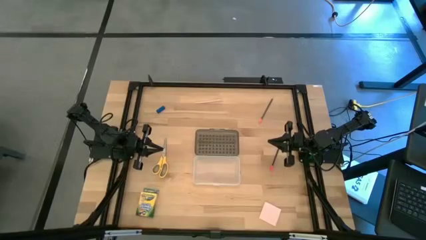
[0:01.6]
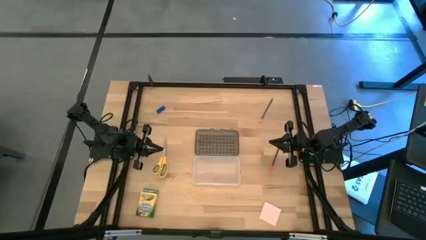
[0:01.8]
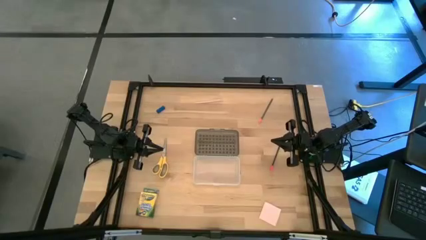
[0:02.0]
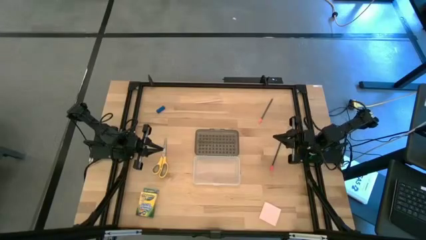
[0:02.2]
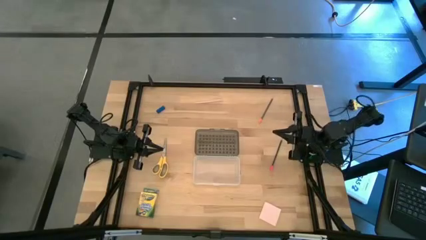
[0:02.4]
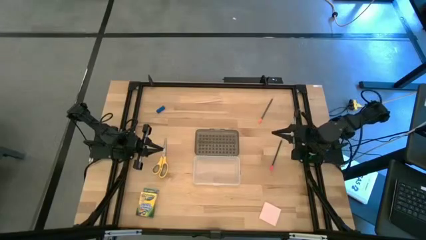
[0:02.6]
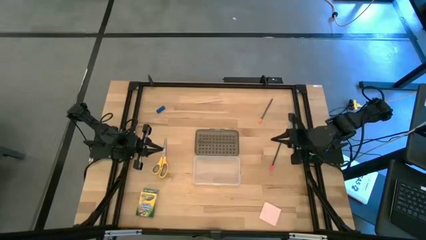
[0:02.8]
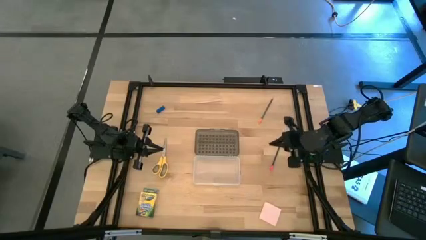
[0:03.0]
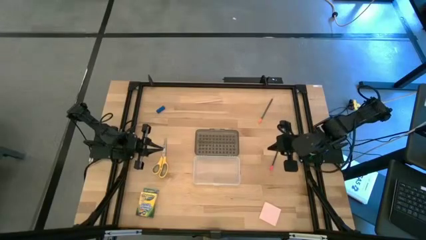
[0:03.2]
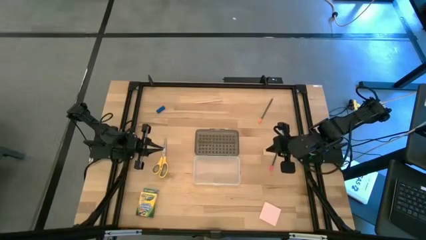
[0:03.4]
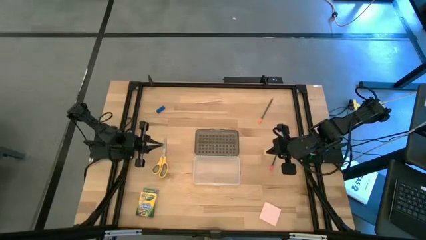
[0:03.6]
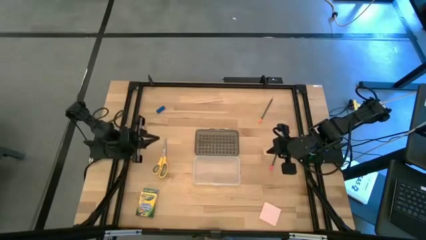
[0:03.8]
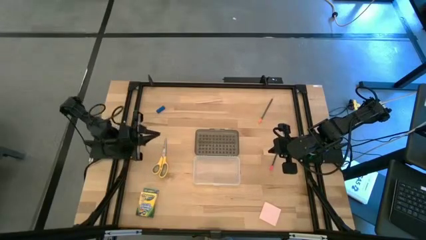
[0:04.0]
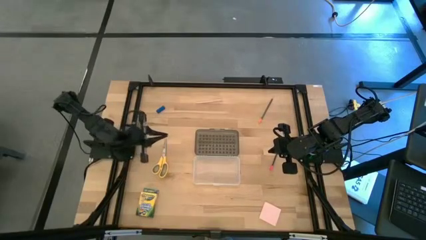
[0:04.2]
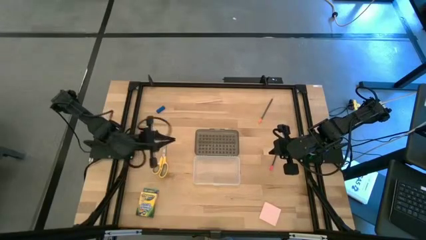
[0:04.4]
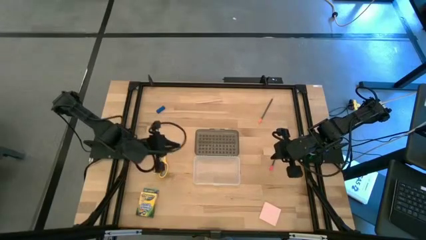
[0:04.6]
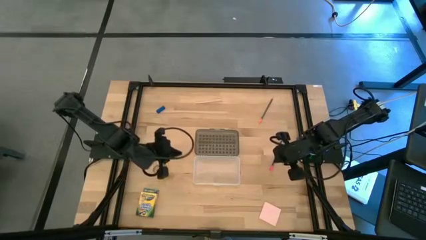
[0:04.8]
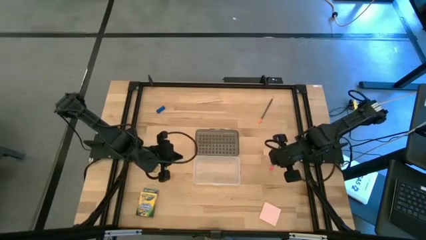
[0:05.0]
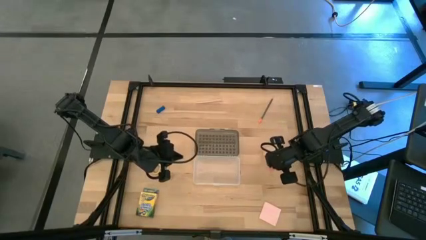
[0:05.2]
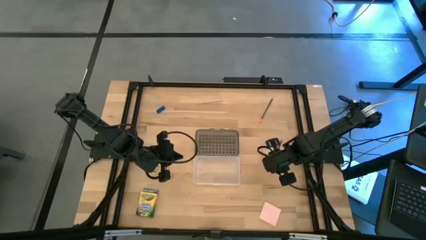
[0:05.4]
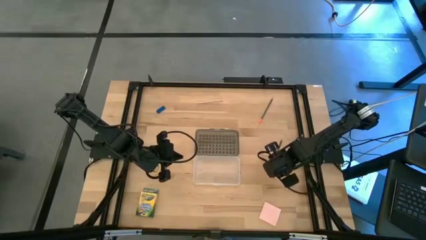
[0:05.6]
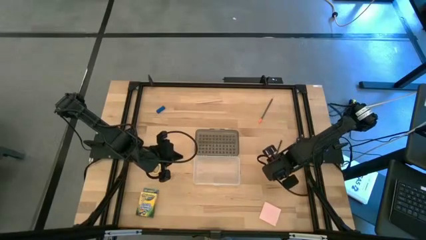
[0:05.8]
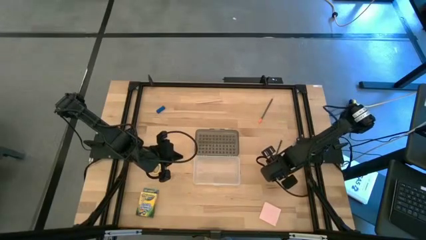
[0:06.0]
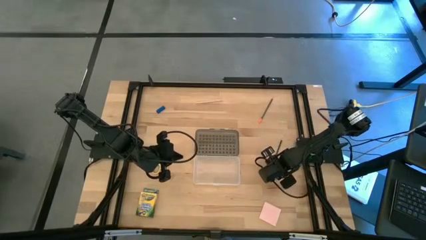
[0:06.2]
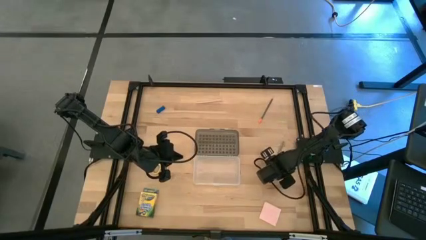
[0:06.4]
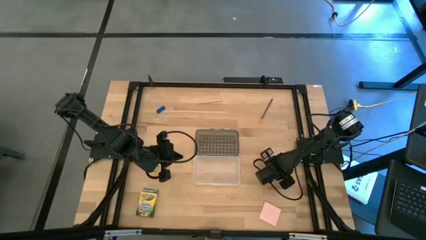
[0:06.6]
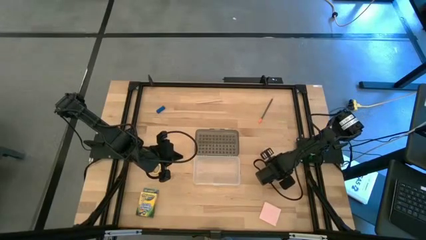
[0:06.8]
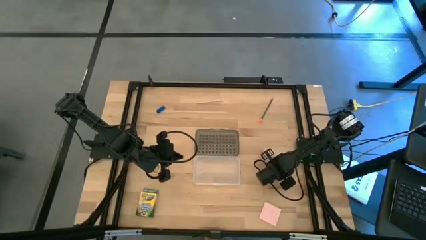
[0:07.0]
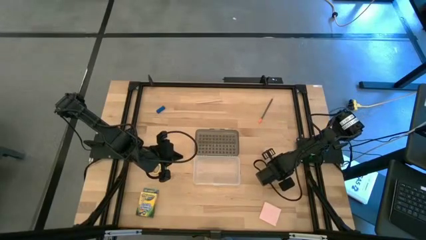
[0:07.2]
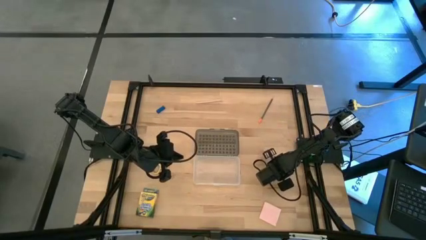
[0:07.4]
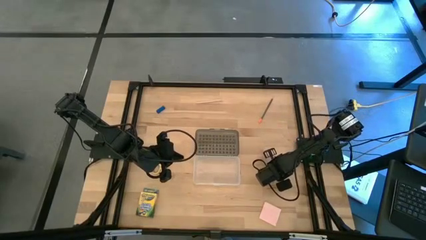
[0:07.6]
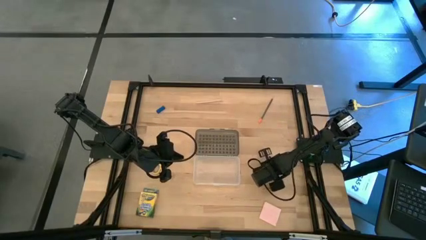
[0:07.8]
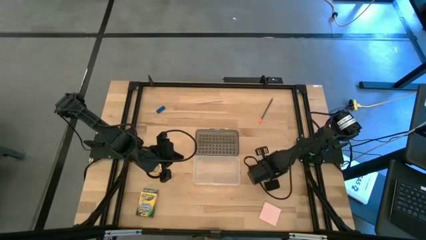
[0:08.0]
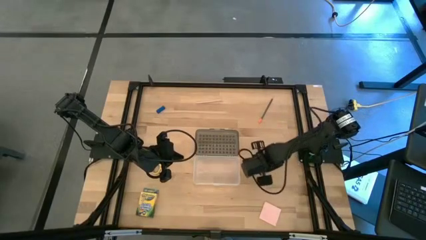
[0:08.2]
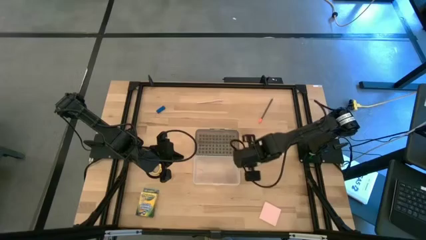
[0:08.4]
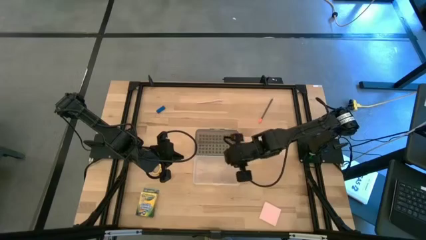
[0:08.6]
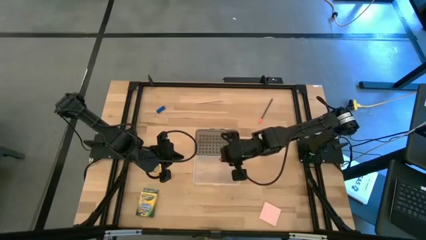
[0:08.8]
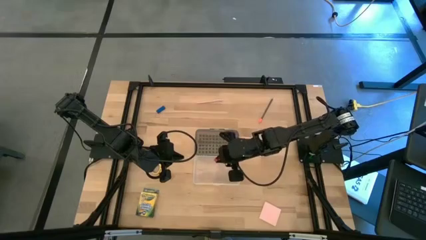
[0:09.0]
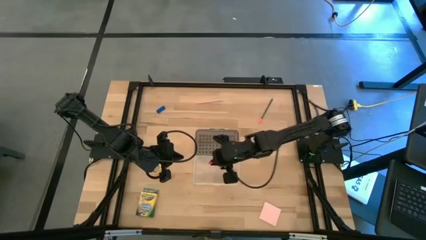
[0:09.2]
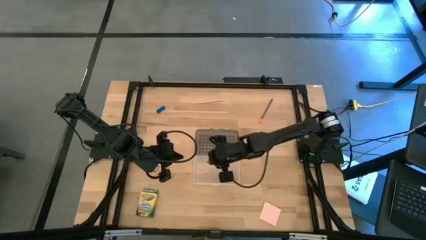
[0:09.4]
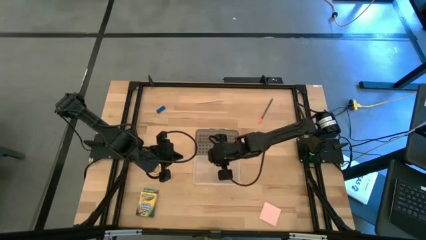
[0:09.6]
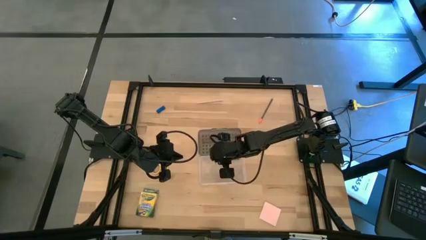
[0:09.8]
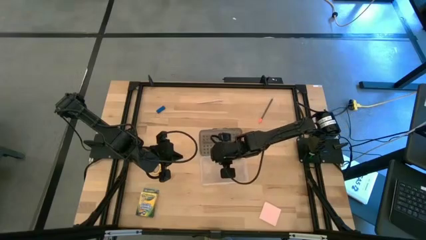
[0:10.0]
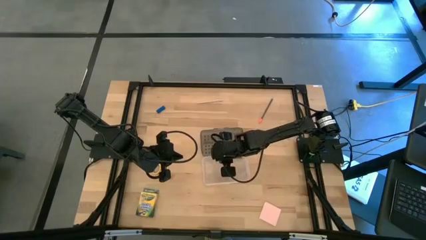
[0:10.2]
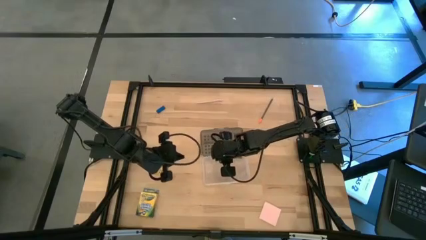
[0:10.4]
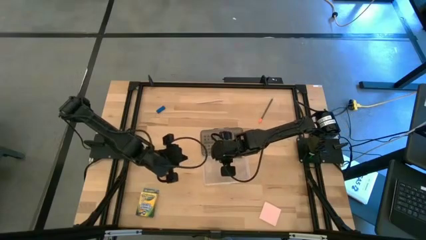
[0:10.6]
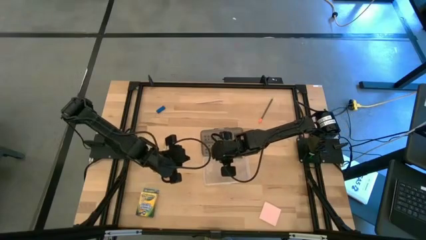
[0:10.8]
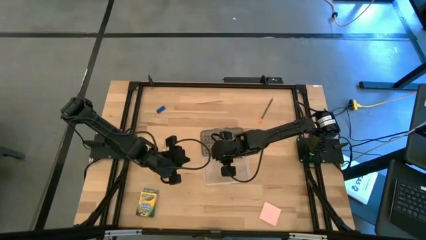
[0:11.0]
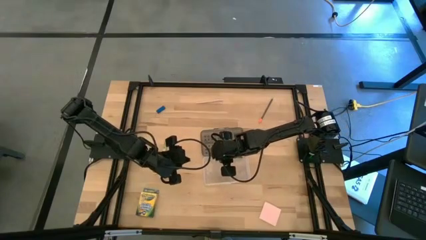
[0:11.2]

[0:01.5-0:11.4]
Task: Pack school essentials
Put the black and pink pencil into the transparent supply box

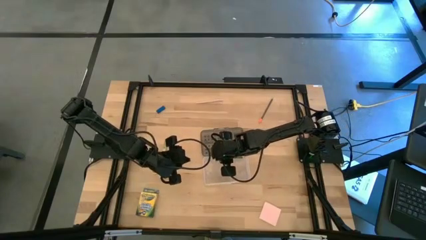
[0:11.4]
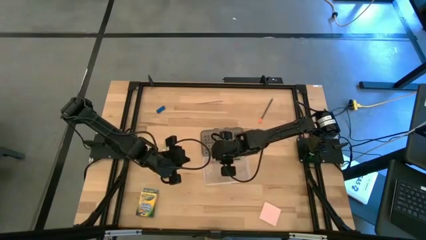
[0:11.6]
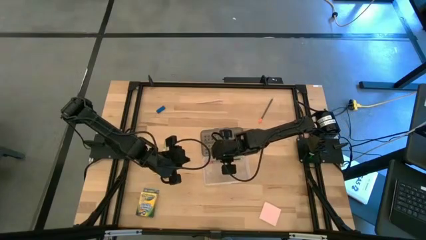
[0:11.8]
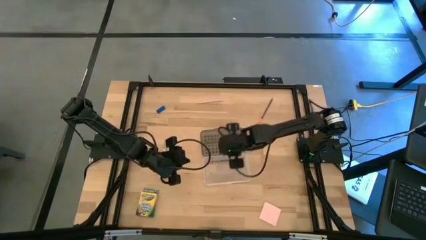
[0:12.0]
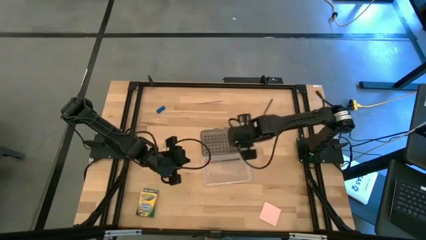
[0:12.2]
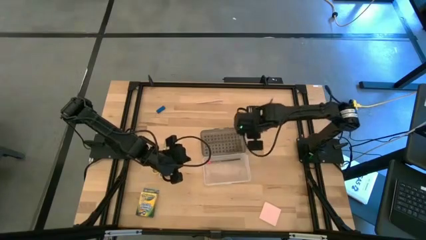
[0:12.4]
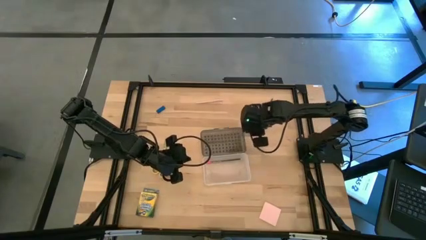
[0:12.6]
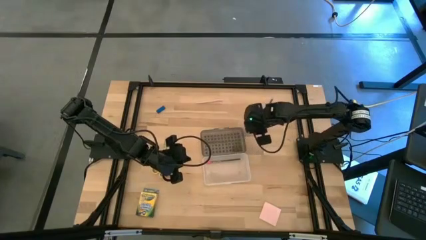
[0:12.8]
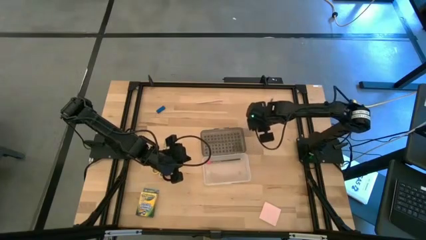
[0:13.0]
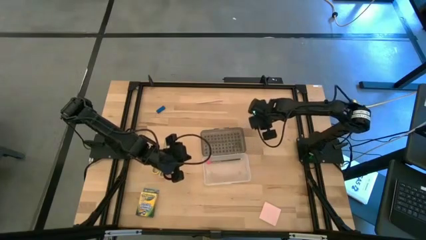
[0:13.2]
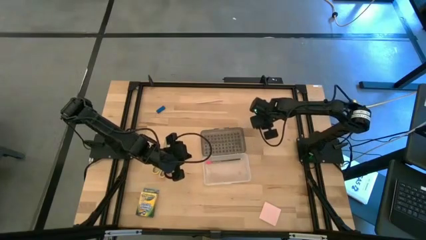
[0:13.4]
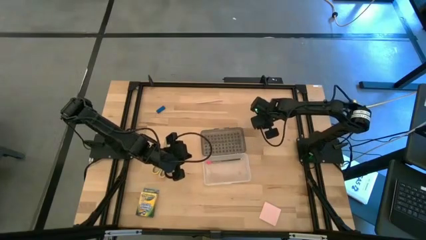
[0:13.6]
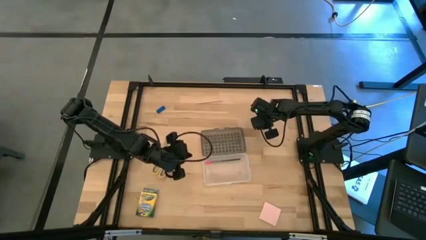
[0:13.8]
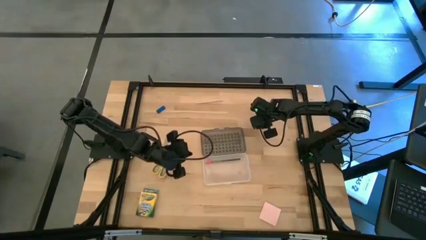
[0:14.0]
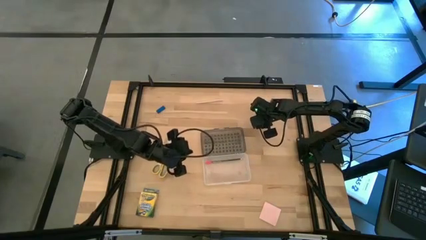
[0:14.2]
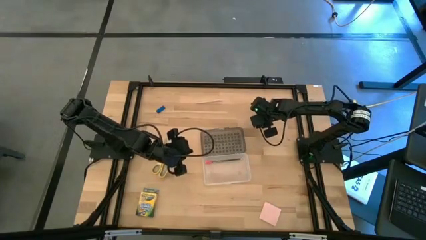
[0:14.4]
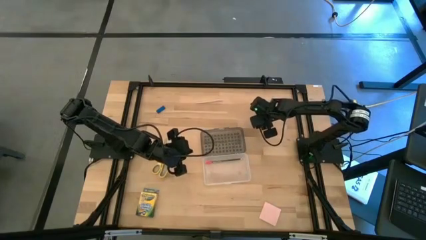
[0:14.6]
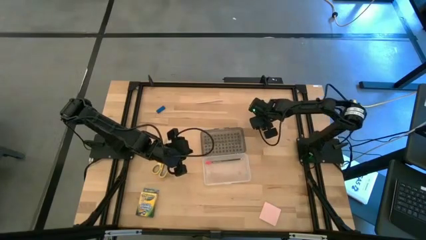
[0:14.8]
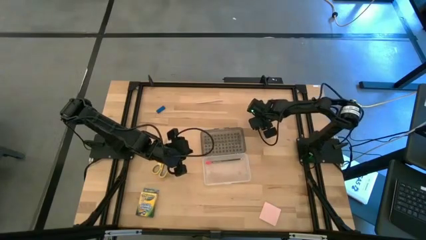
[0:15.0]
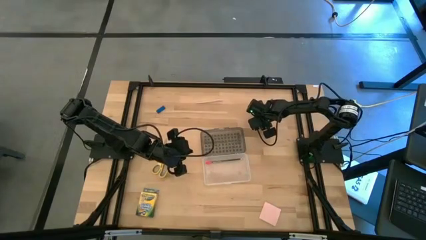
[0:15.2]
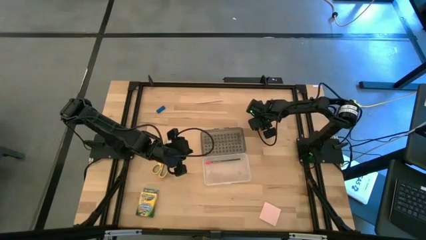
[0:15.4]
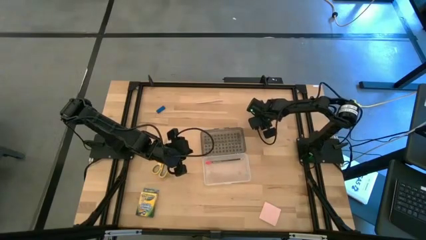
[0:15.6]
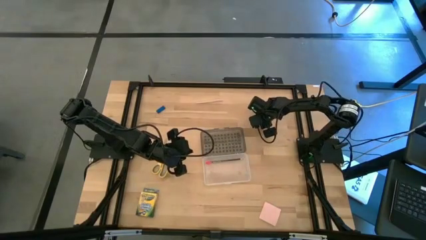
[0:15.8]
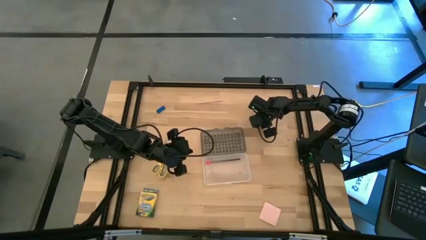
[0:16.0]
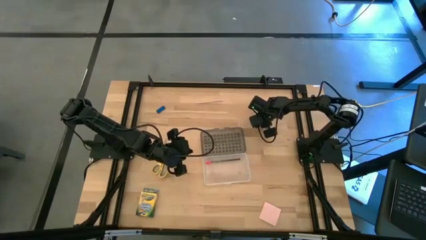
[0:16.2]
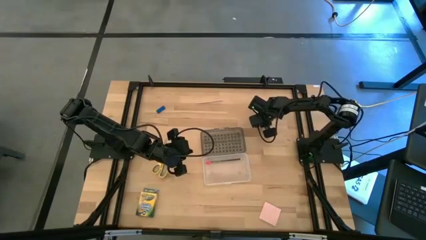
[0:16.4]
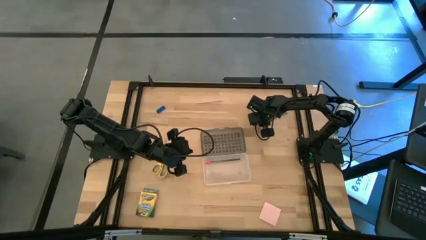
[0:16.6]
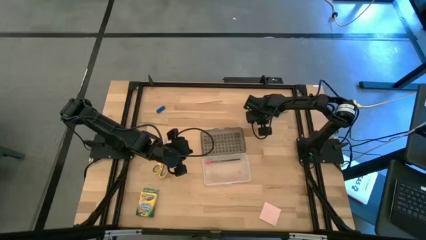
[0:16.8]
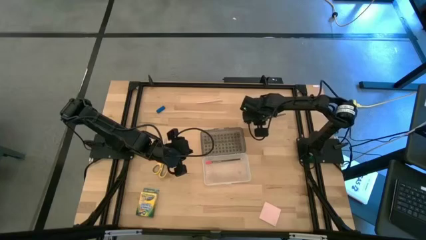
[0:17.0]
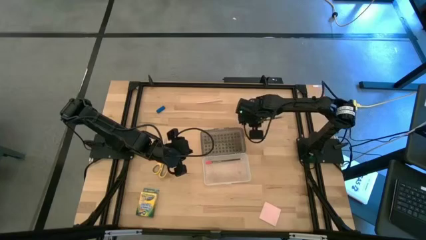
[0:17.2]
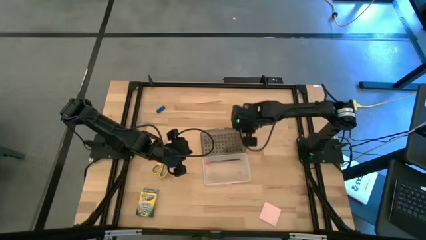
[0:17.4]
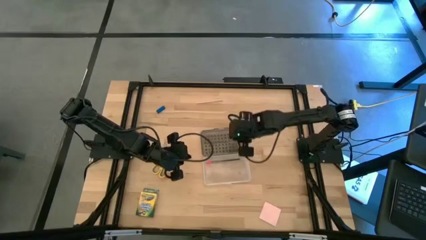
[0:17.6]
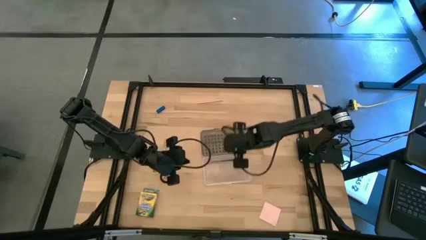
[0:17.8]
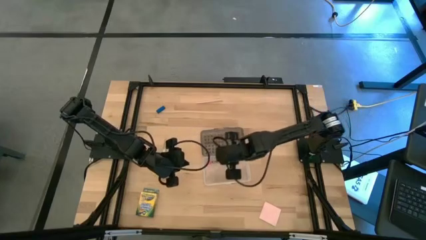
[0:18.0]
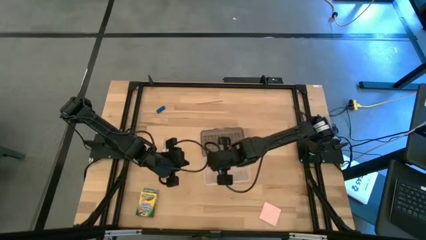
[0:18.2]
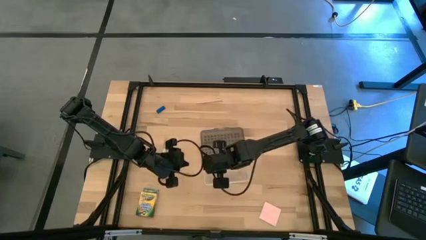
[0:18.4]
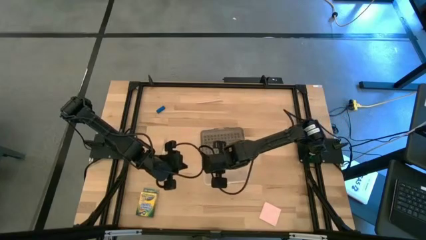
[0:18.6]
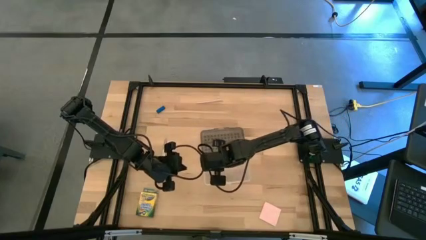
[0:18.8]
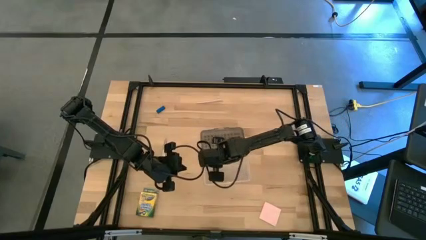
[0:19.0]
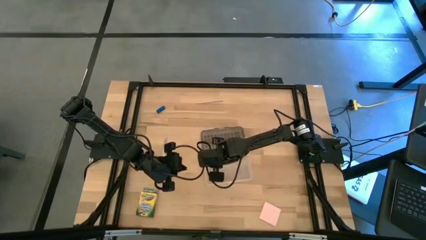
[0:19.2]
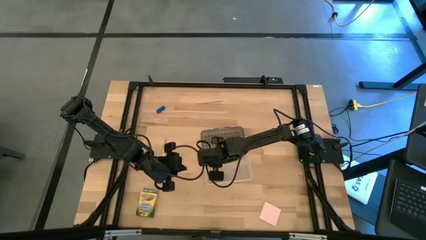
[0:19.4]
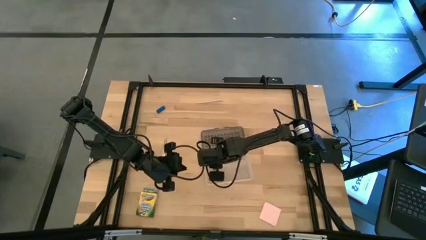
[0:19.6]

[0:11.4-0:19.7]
Put the black and orange pencil into the transparent supply box
